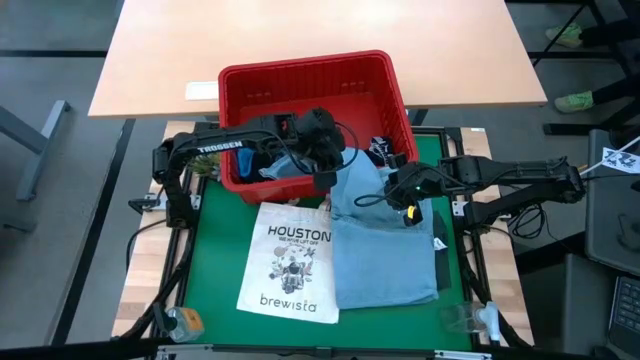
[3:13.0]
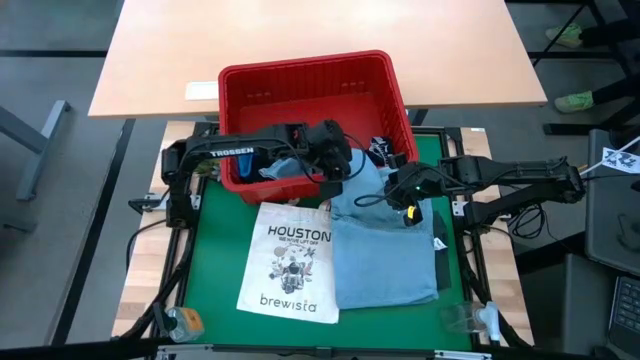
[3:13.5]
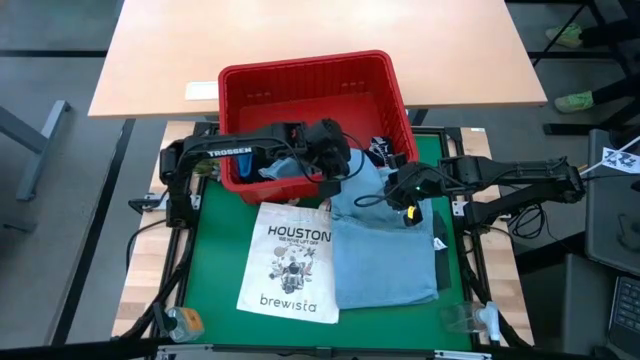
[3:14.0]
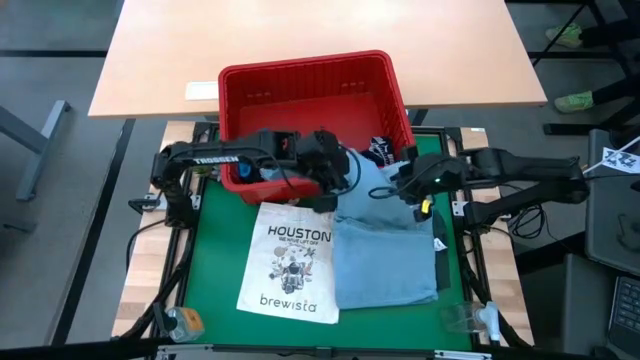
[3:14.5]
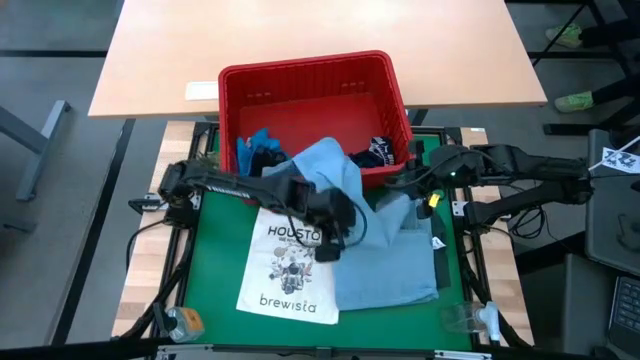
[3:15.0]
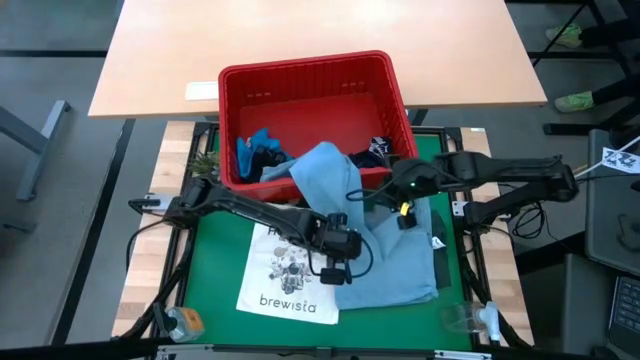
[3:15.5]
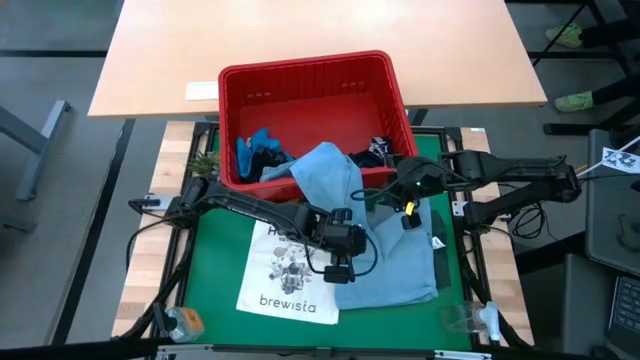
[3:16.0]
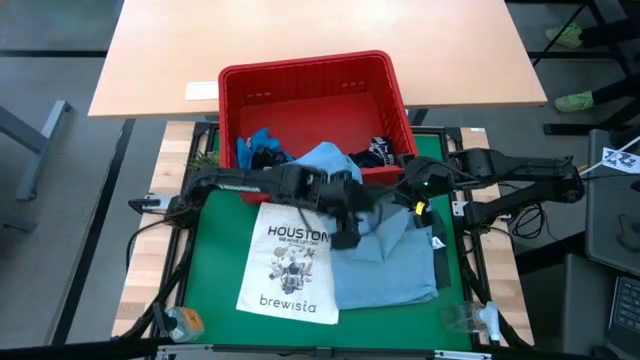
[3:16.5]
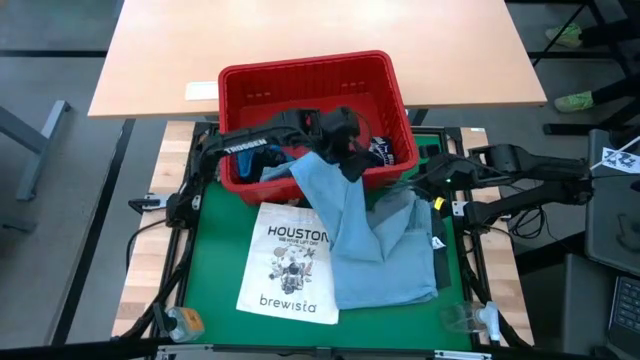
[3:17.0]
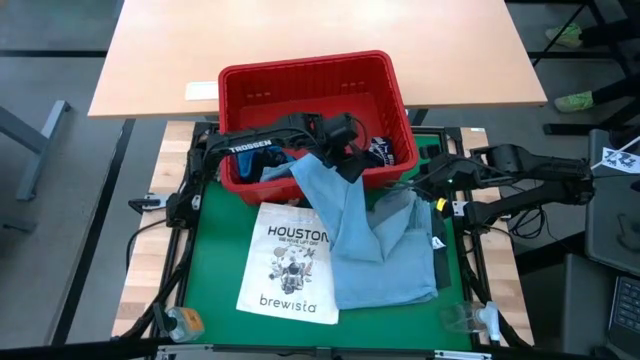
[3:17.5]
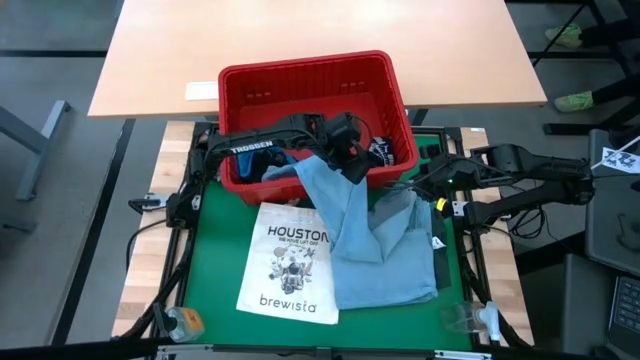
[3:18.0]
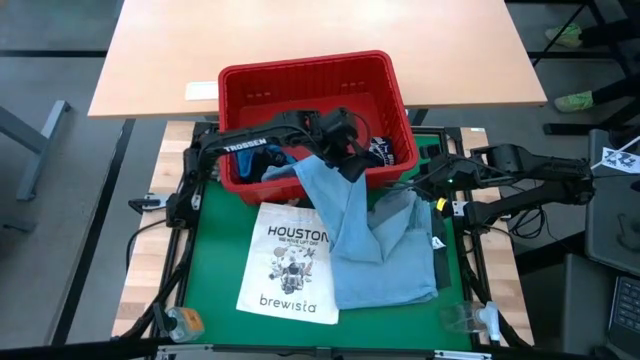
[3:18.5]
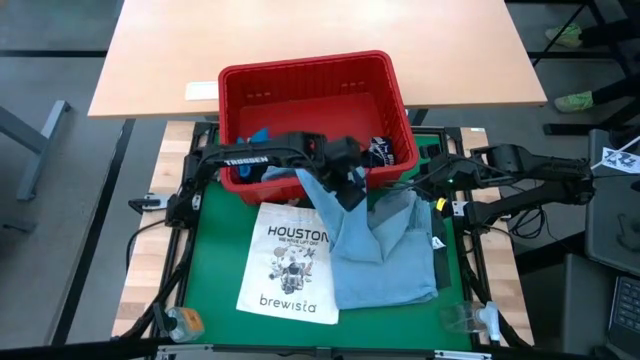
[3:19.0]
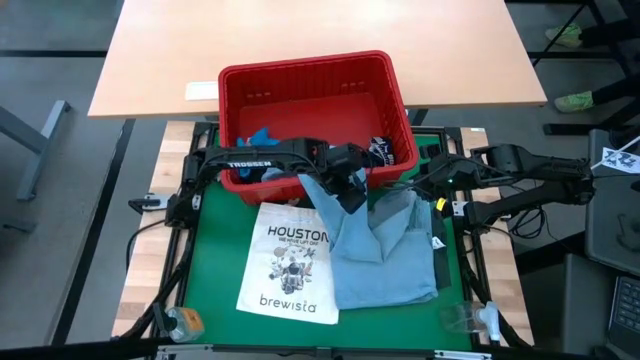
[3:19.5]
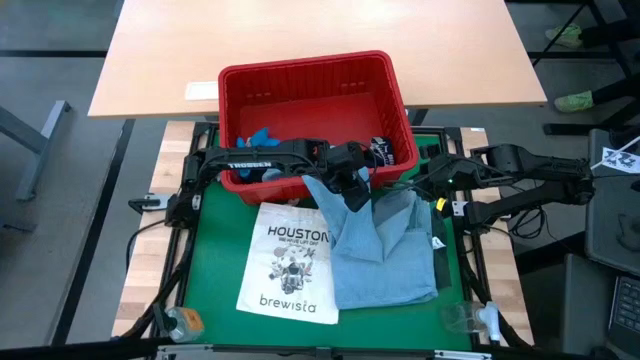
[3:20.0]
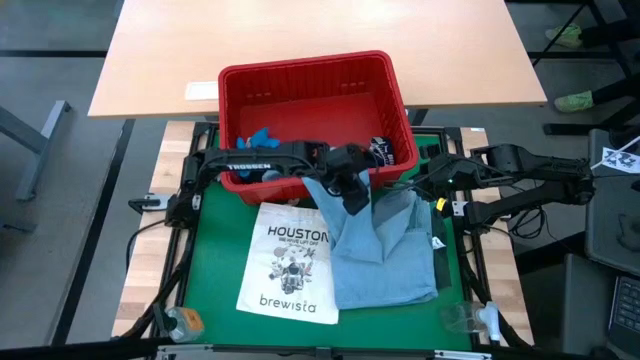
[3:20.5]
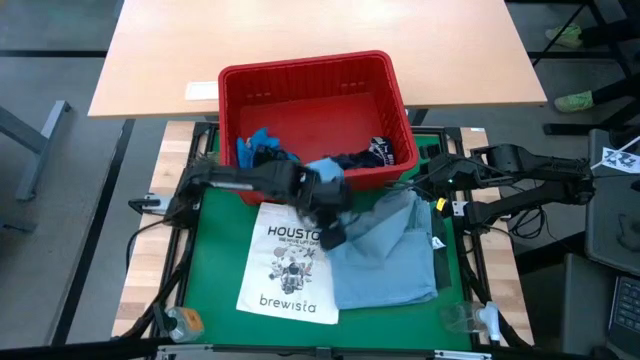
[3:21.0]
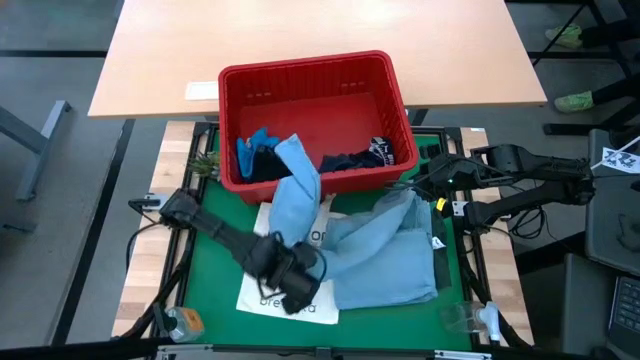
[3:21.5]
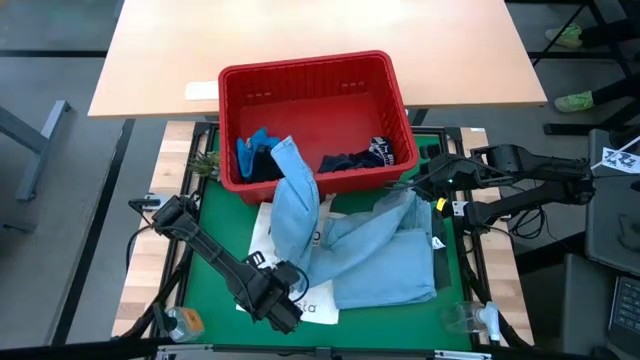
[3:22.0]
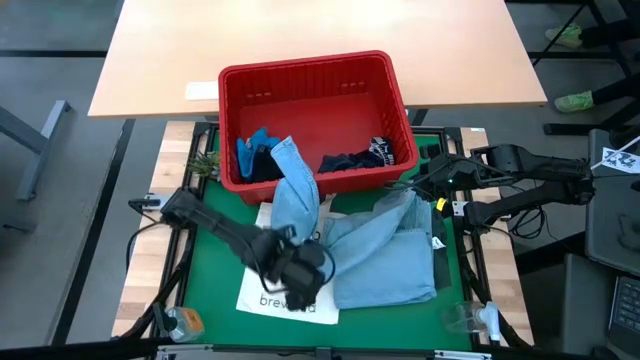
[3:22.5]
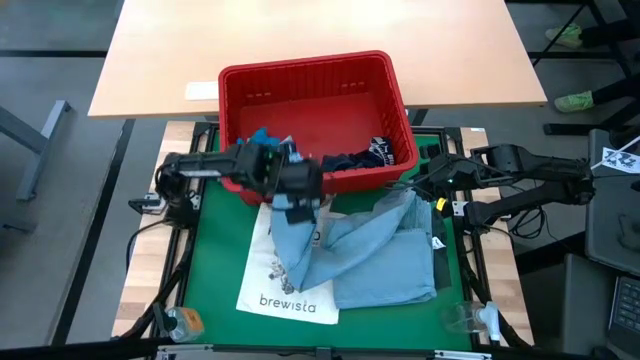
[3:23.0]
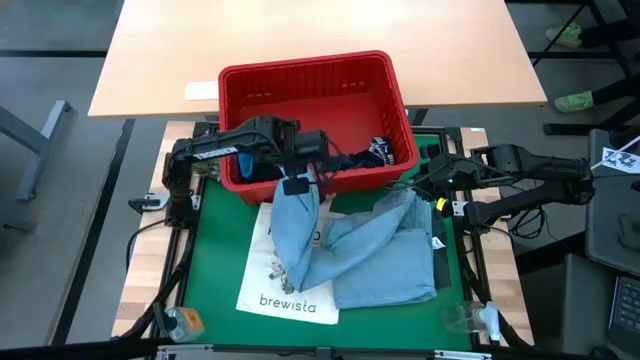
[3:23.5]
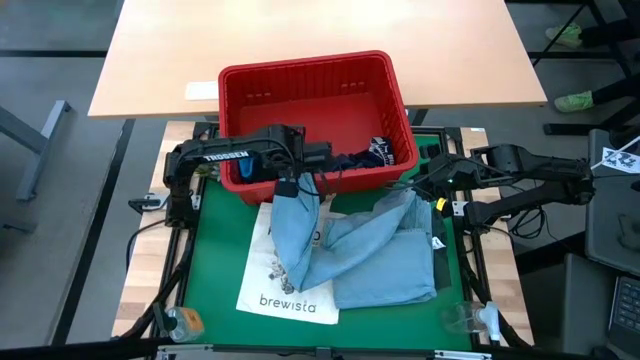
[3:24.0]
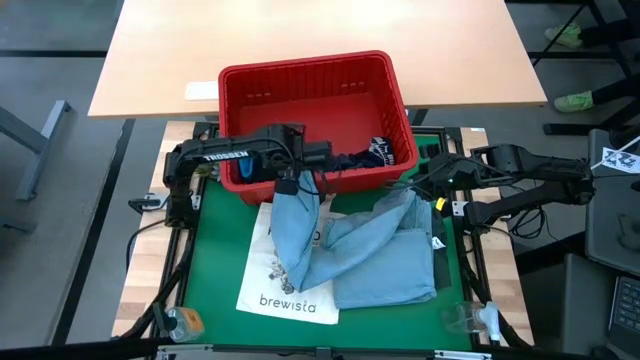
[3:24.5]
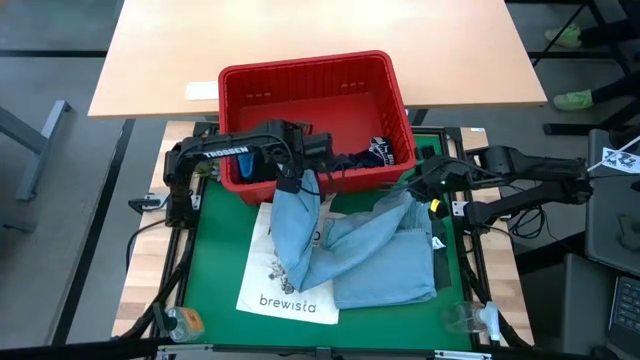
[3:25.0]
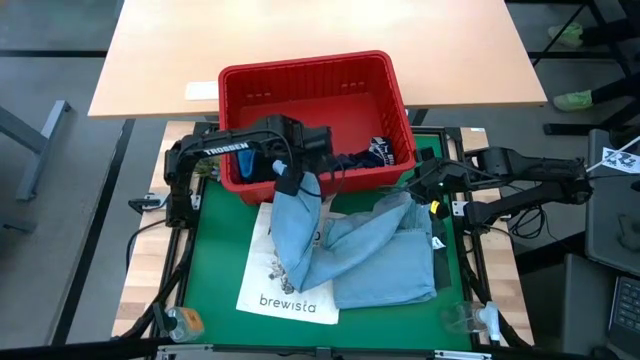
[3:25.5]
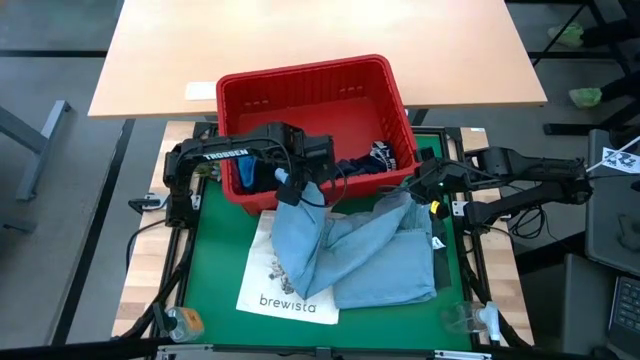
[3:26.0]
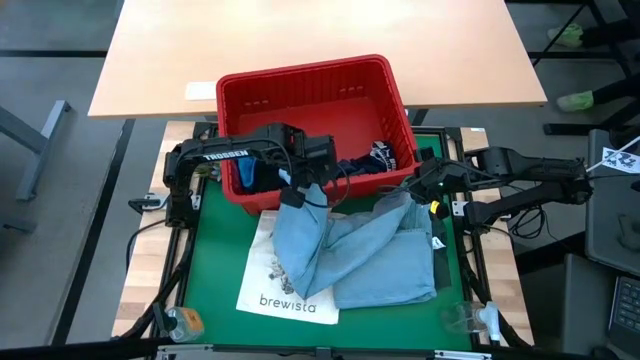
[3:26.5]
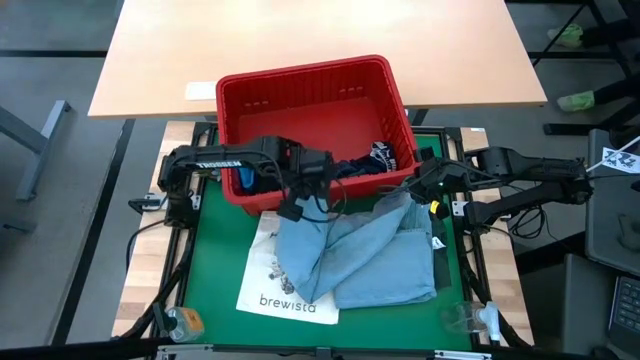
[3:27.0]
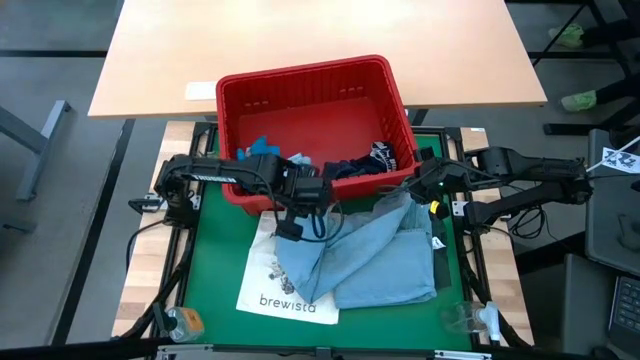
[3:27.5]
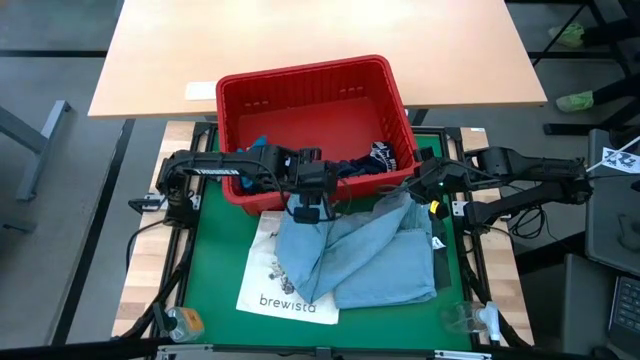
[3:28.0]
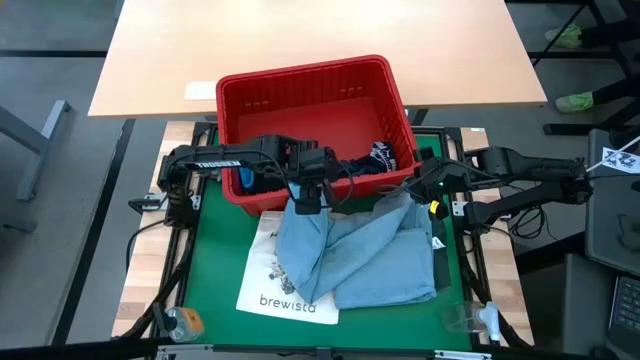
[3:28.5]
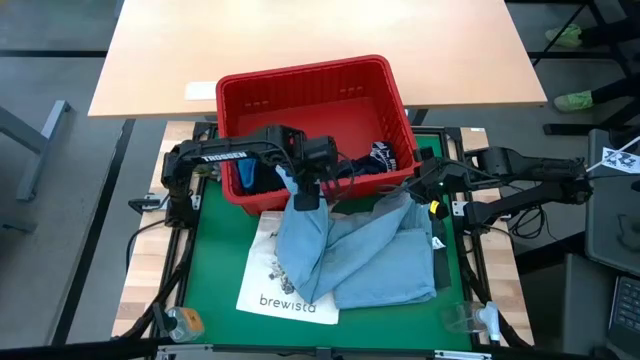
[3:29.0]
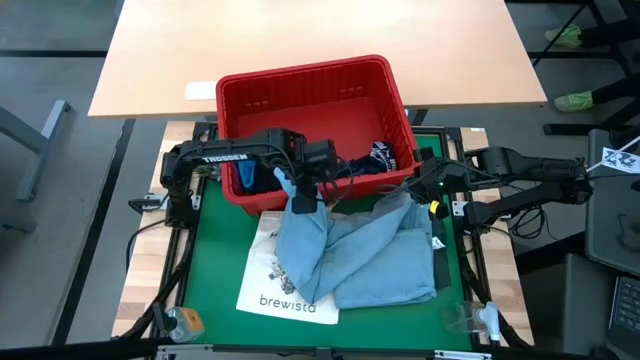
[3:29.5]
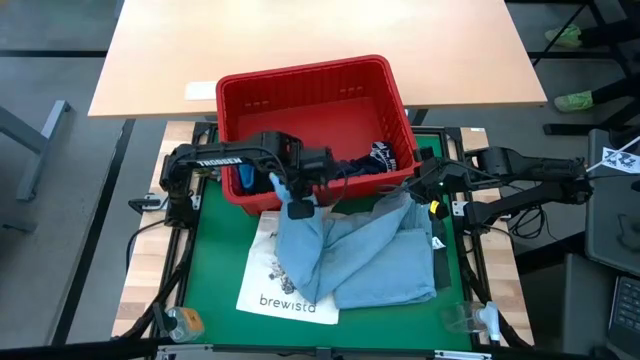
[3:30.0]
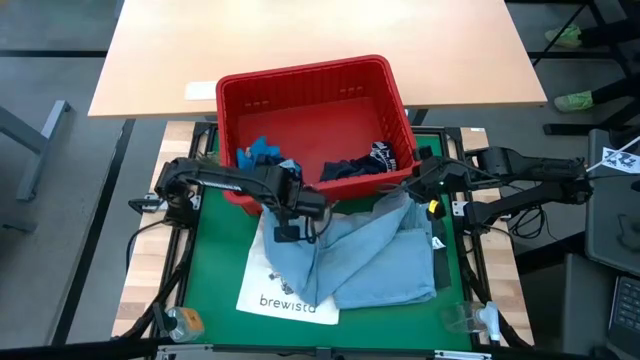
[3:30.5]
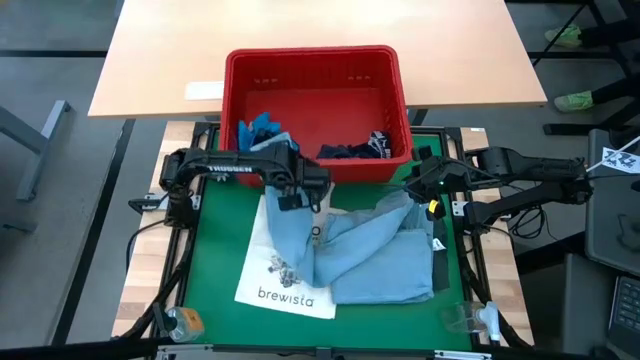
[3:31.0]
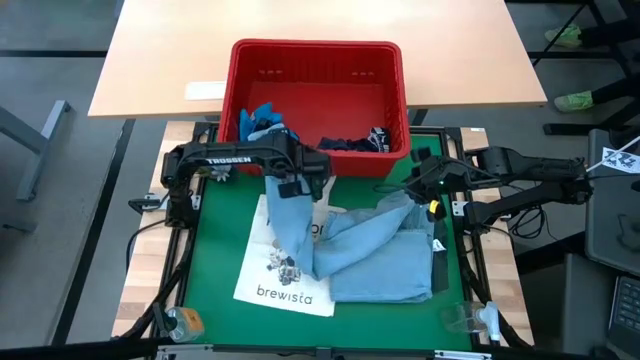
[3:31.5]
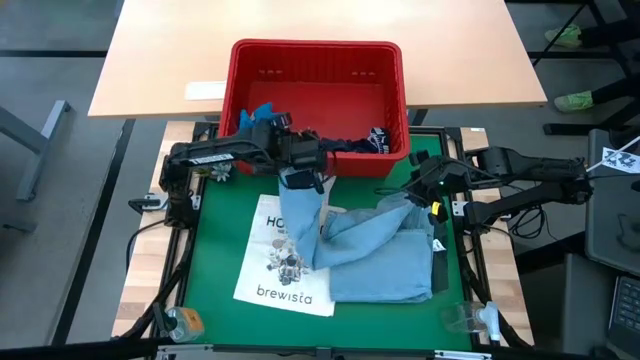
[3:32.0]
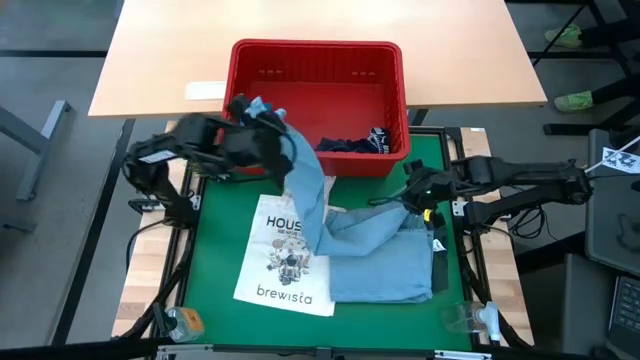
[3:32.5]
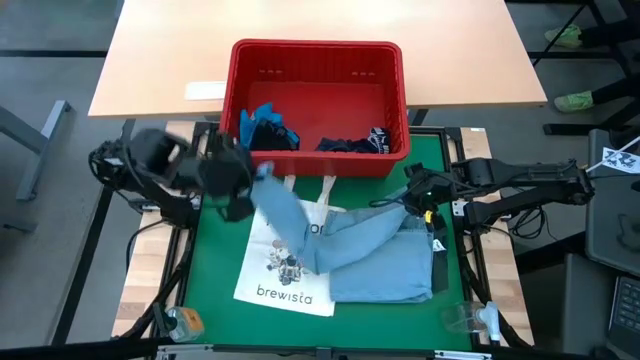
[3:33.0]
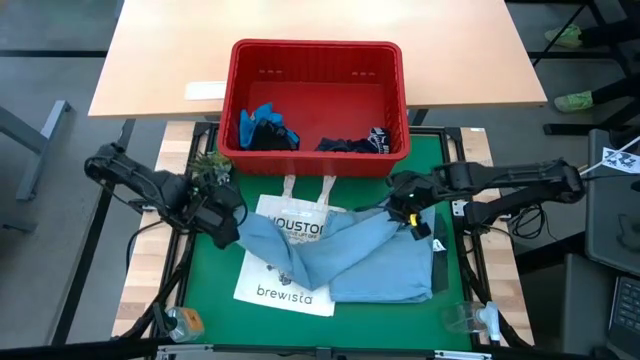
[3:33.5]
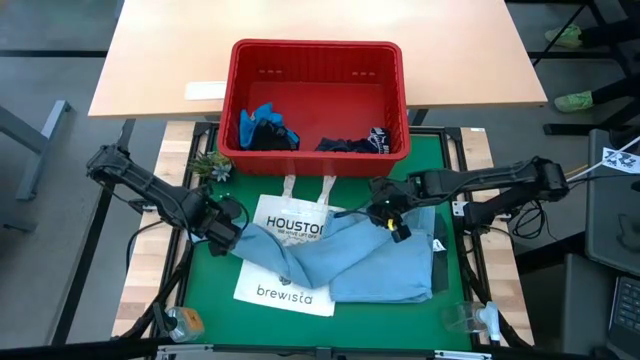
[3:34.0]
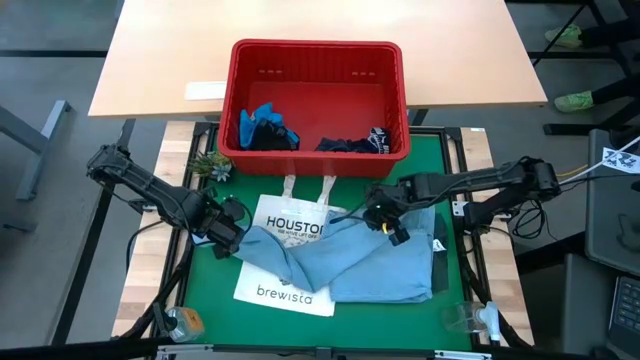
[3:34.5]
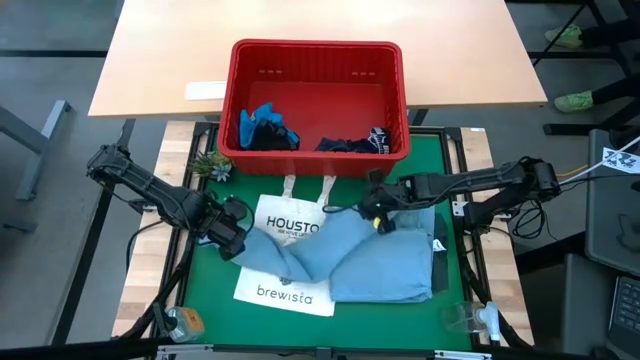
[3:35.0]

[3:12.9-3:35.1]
Task: Fold Laundry from Bin
Fold the light blue jeans
